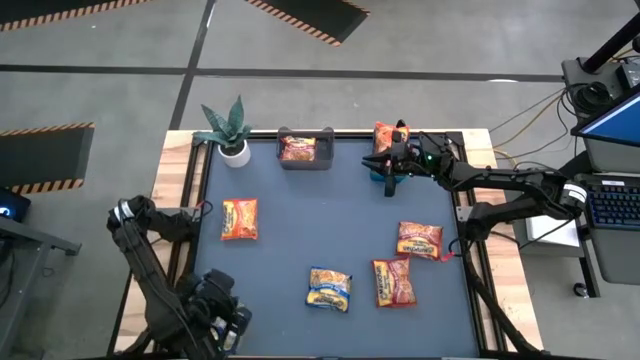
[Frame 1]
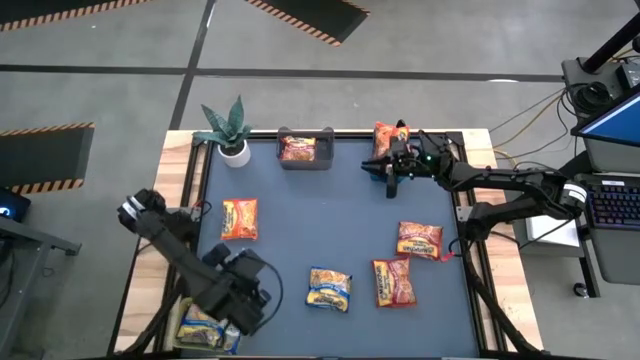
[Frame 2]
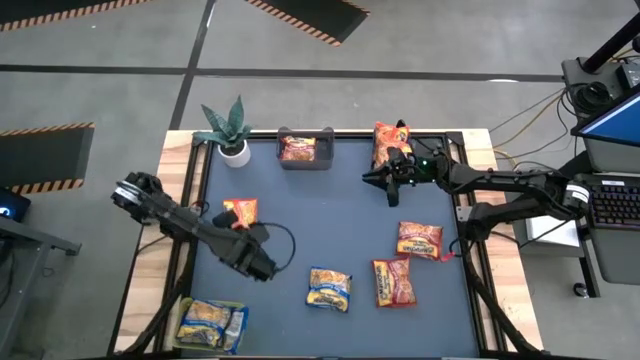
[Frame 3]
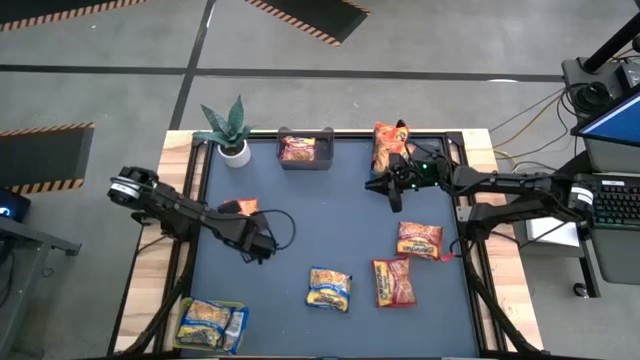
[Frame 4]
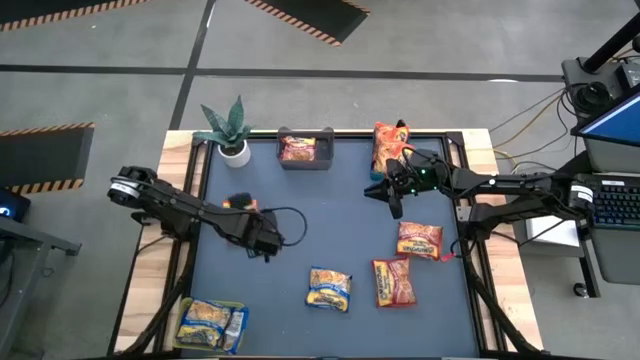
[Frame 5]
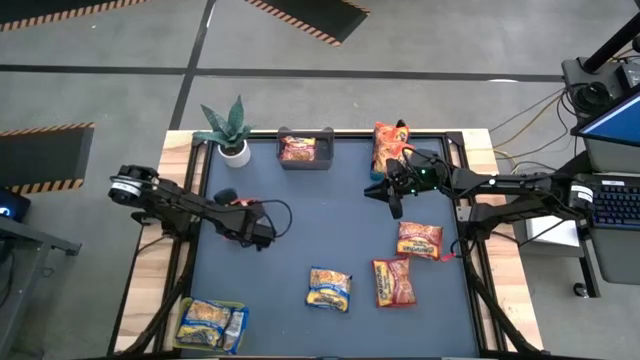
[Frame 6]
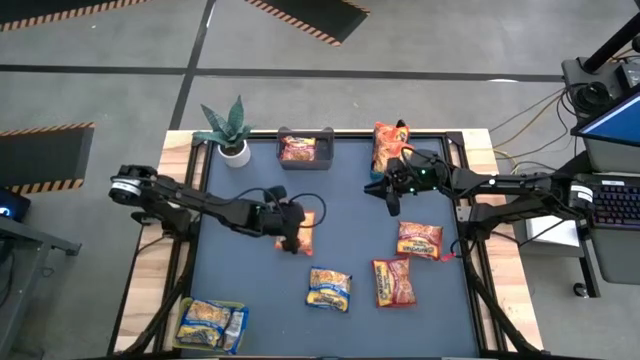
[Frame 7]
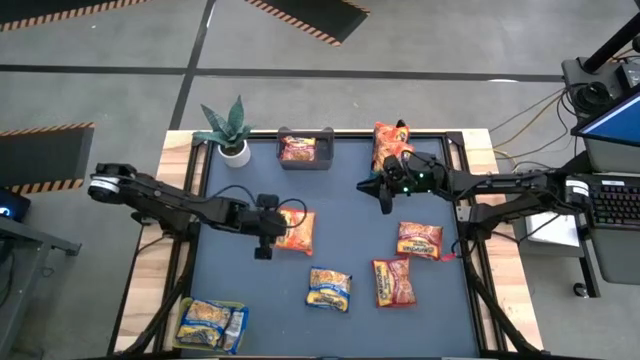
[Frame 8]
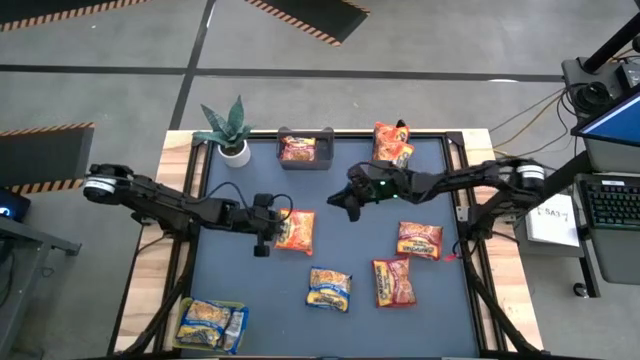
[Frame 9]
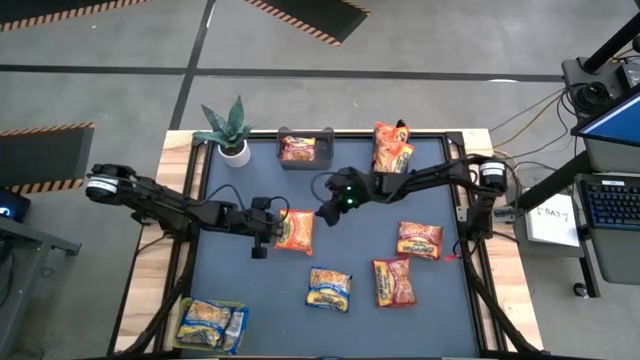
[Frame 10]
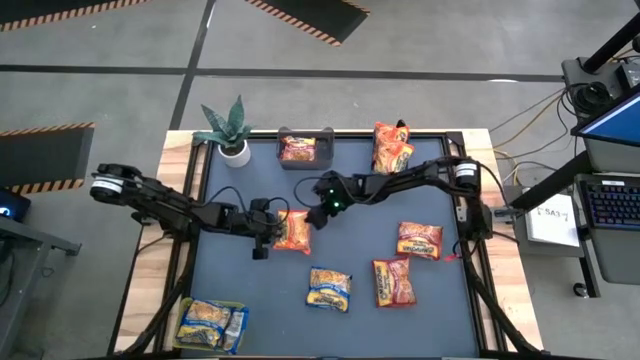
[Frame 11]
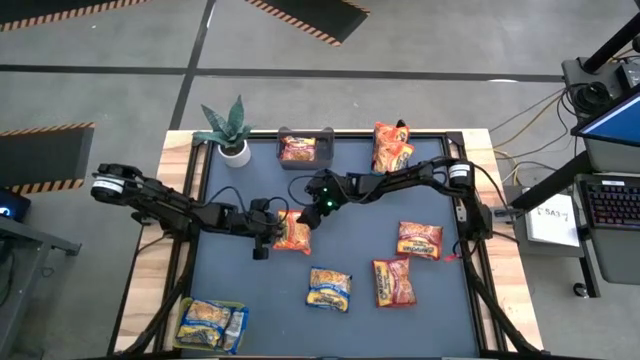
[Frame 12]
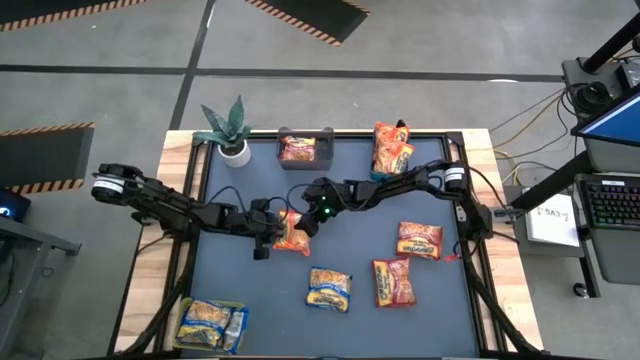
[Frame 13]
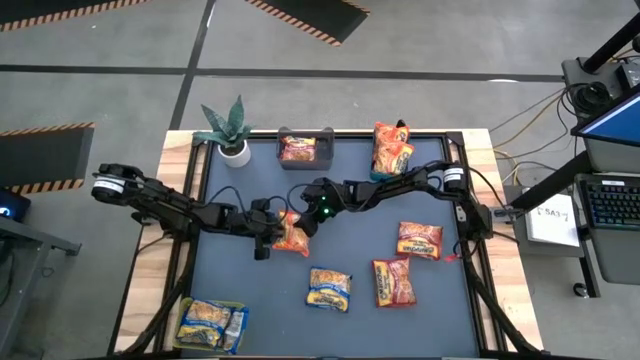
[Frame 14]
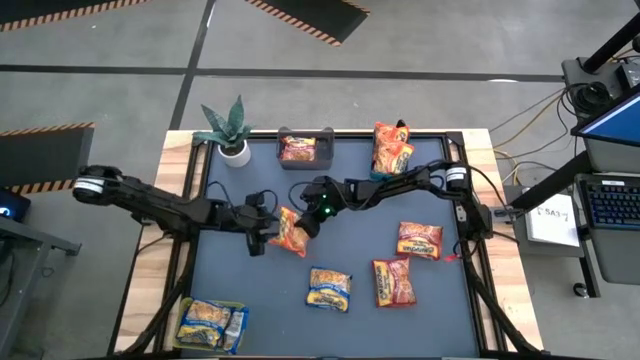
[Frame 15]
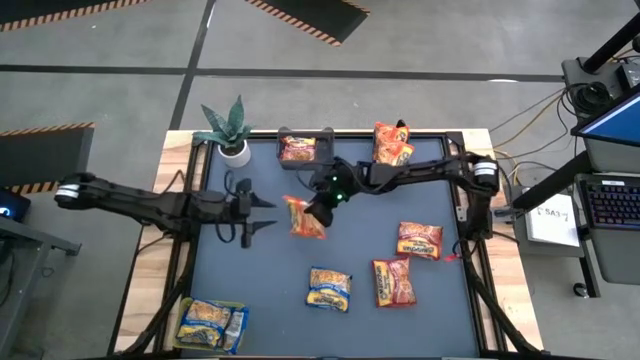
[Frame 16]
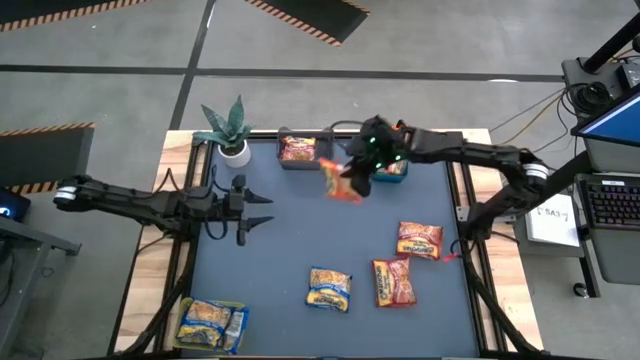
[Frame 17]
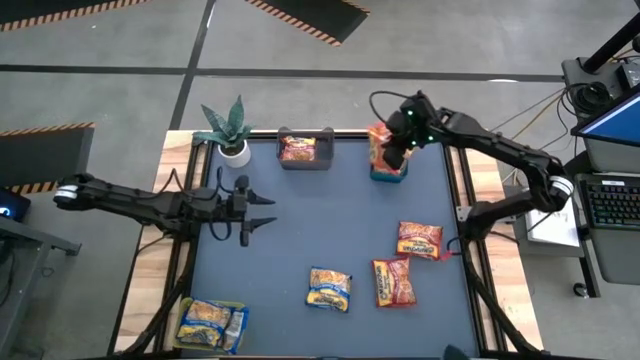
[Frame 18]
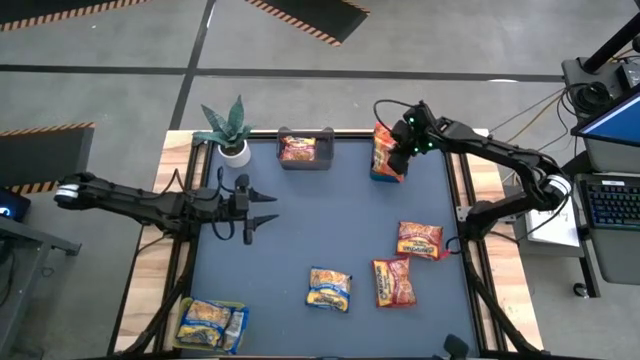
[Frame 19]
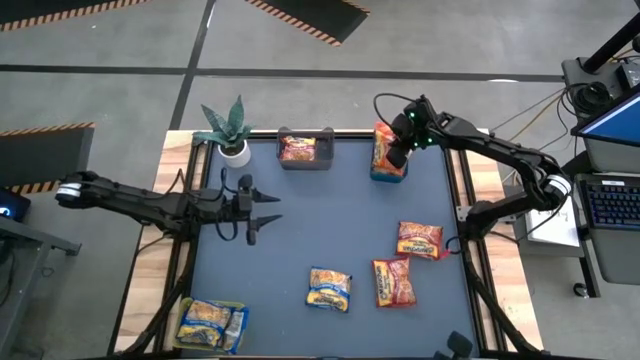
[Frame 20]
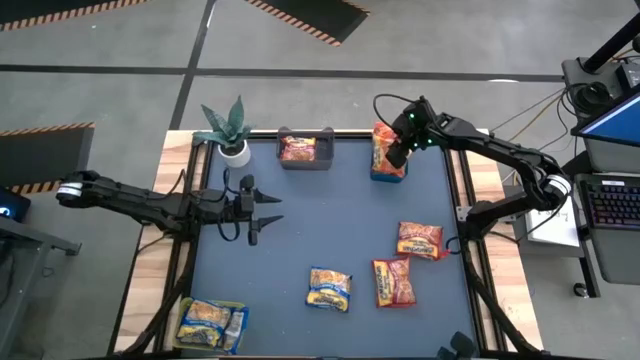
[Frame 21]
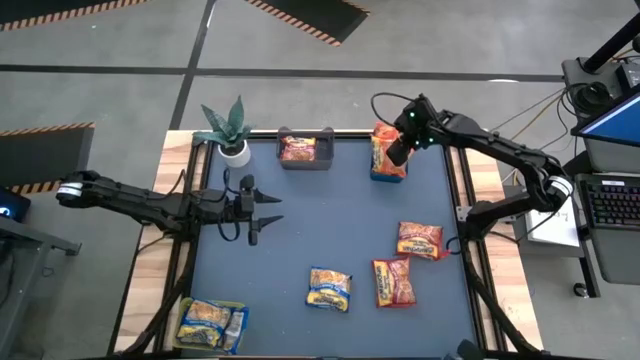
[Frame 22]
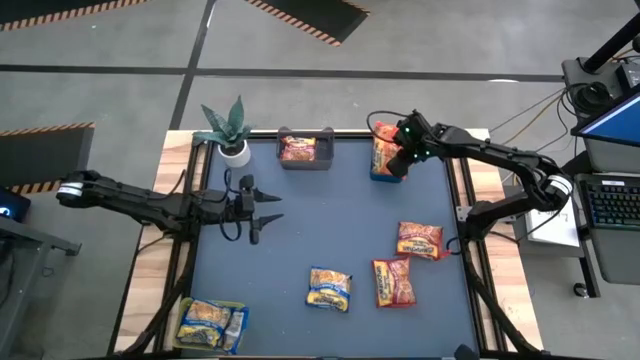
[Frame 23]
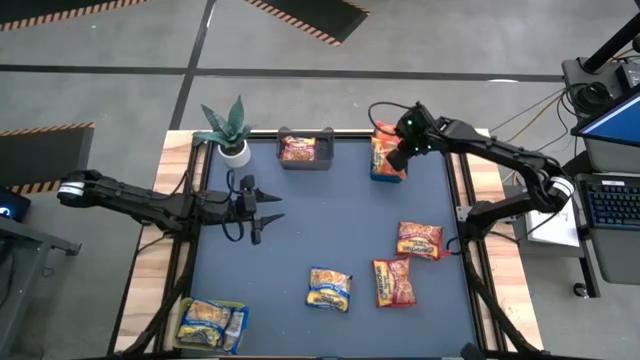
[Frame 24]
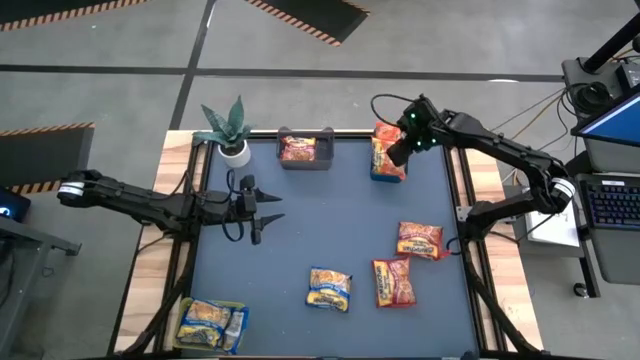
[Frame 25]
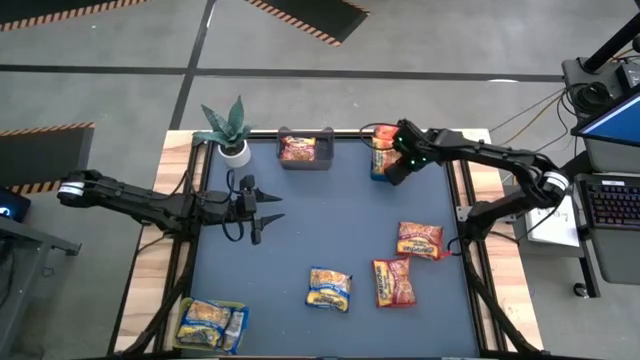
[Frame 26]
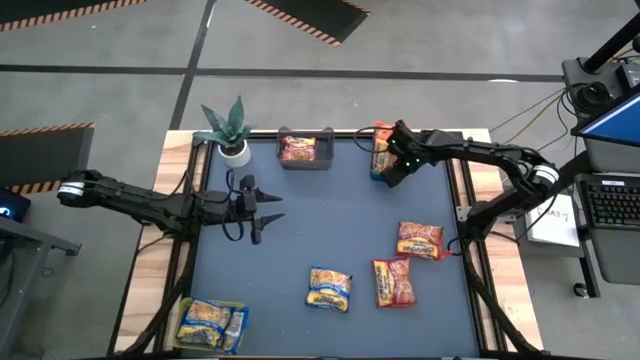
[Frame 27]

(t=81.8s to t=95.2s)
Task: Sort Maruchan noodles
Put the orange noodle pack into the blue bin
